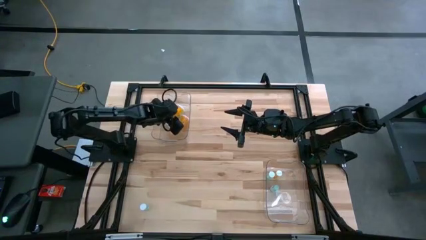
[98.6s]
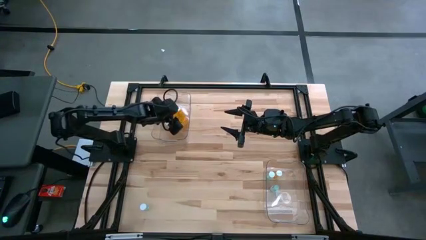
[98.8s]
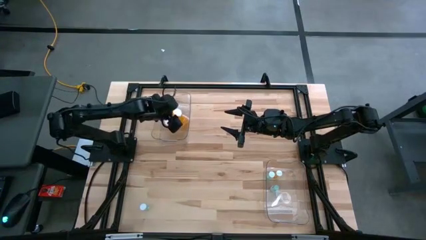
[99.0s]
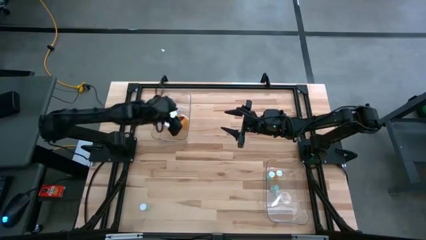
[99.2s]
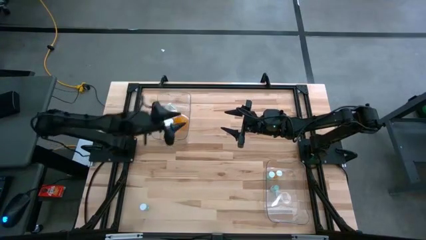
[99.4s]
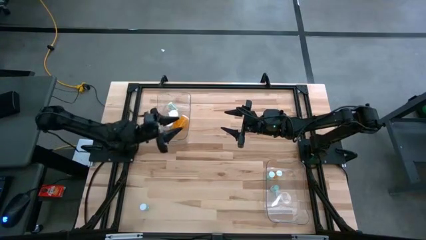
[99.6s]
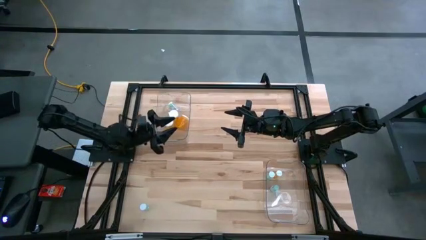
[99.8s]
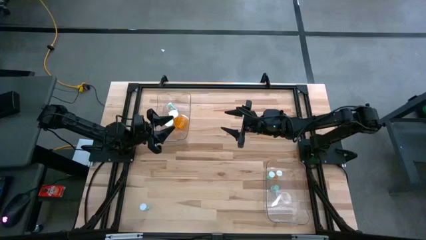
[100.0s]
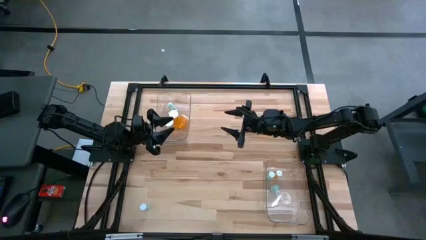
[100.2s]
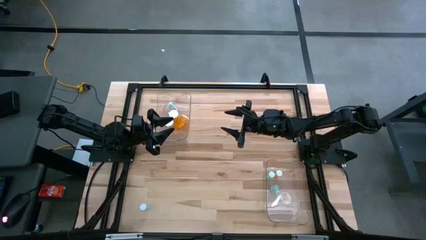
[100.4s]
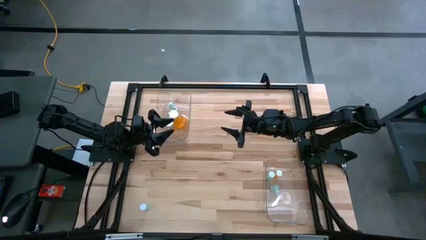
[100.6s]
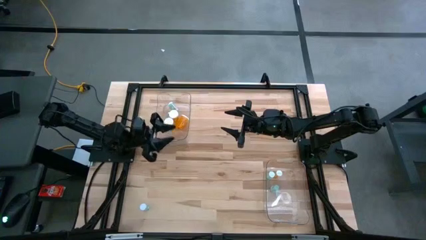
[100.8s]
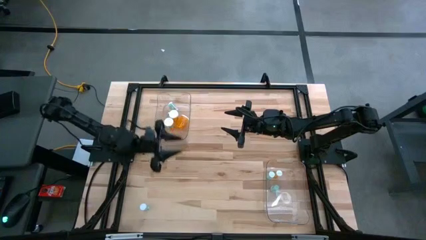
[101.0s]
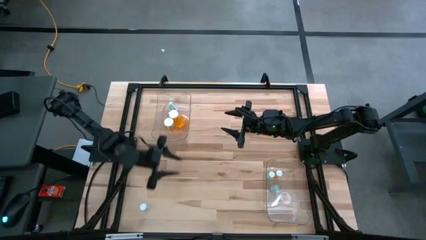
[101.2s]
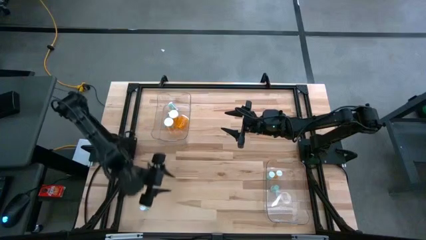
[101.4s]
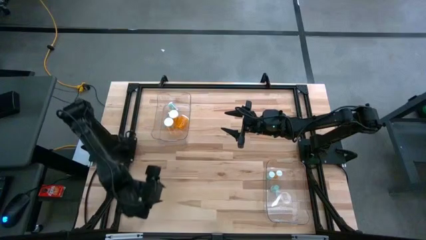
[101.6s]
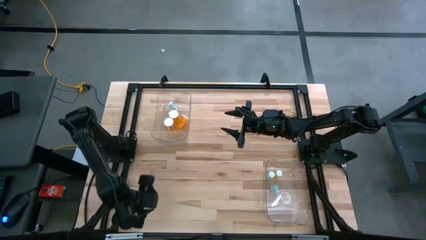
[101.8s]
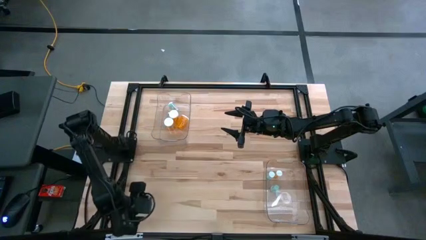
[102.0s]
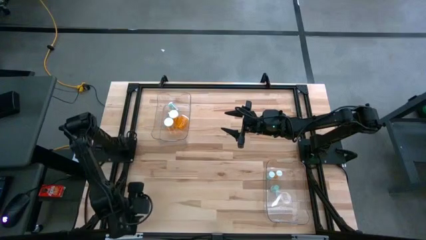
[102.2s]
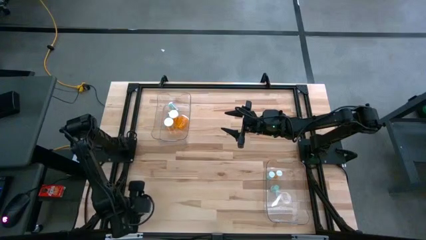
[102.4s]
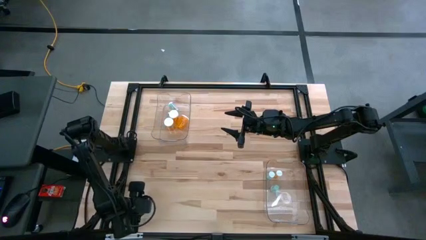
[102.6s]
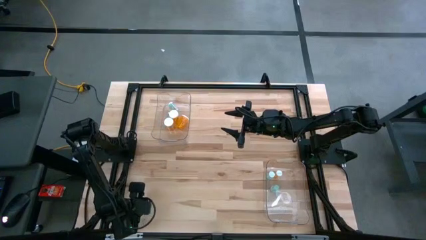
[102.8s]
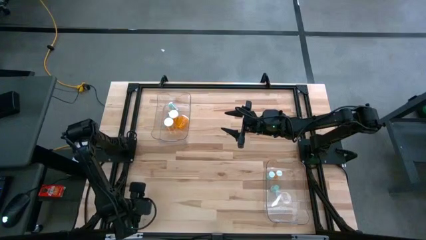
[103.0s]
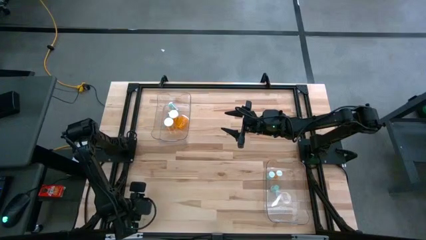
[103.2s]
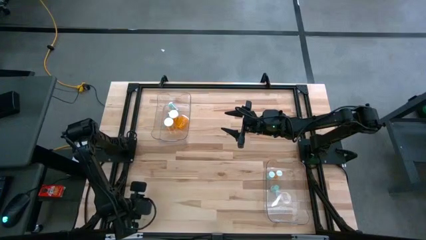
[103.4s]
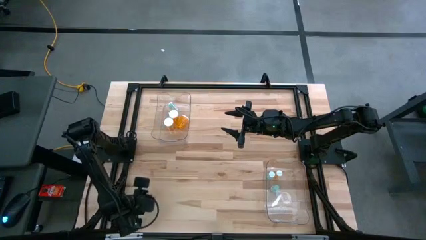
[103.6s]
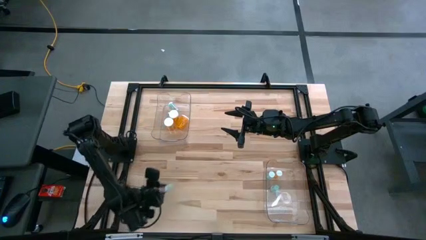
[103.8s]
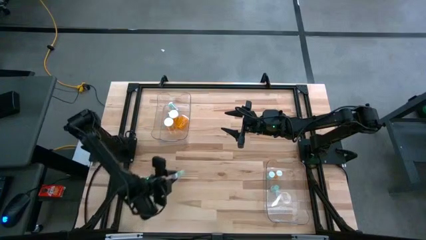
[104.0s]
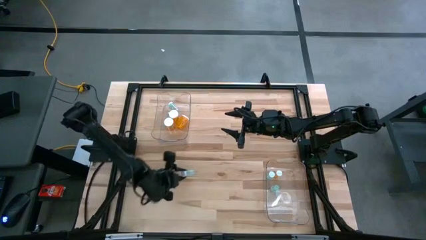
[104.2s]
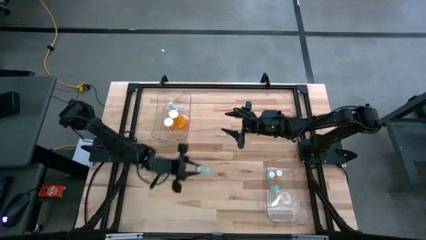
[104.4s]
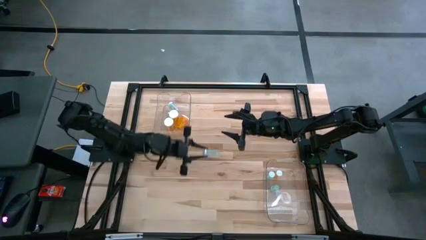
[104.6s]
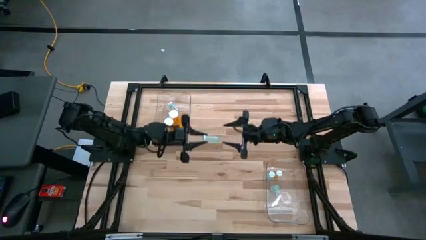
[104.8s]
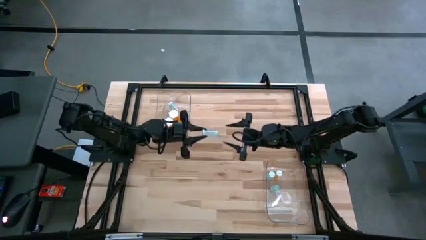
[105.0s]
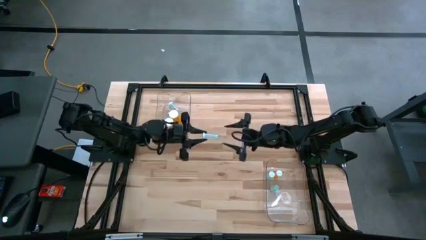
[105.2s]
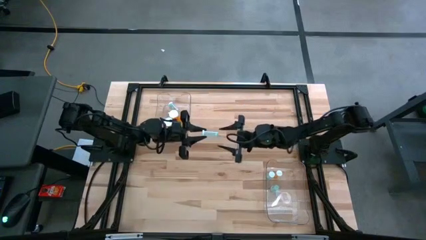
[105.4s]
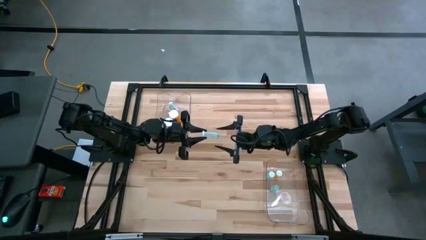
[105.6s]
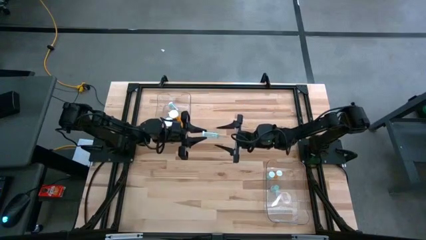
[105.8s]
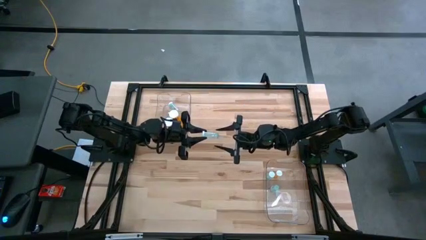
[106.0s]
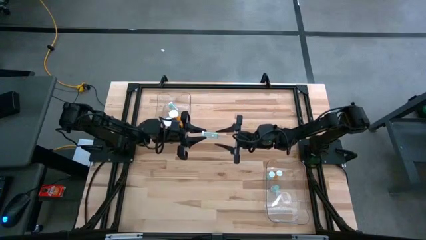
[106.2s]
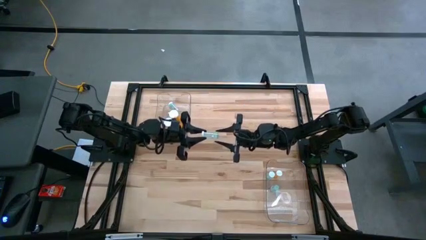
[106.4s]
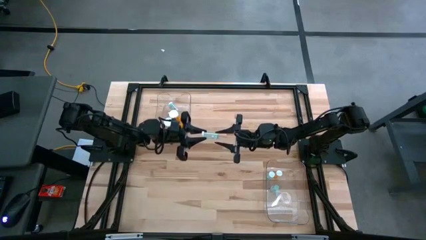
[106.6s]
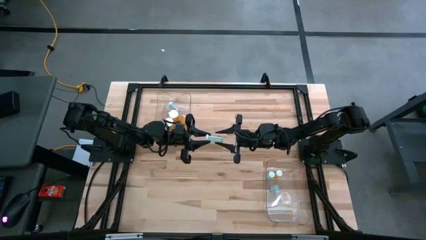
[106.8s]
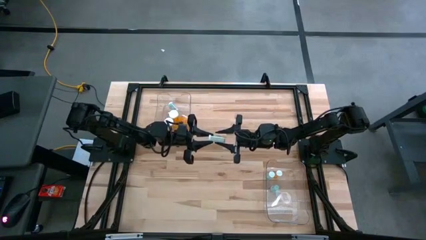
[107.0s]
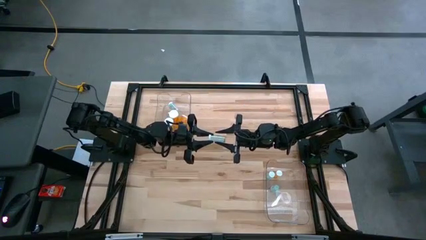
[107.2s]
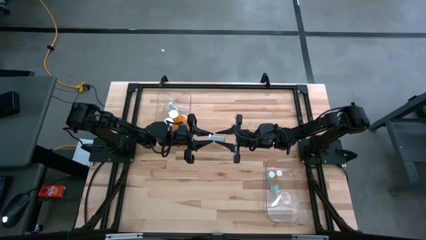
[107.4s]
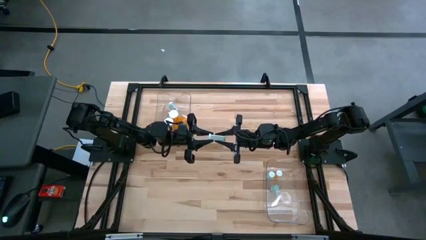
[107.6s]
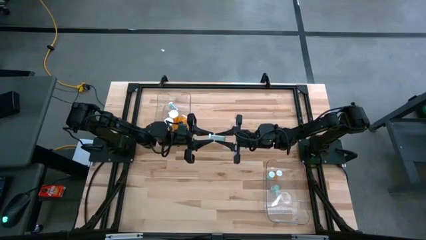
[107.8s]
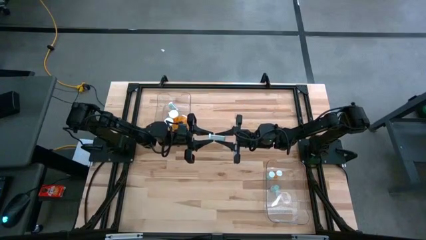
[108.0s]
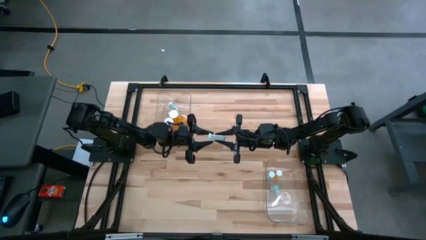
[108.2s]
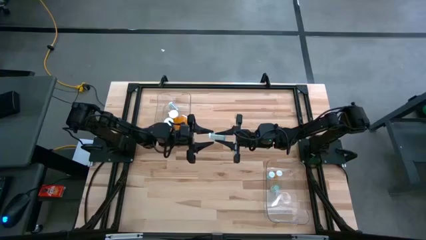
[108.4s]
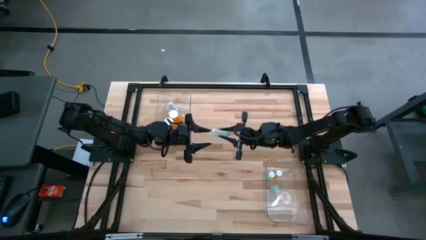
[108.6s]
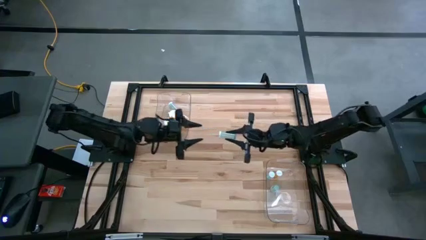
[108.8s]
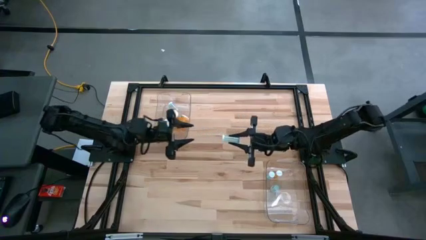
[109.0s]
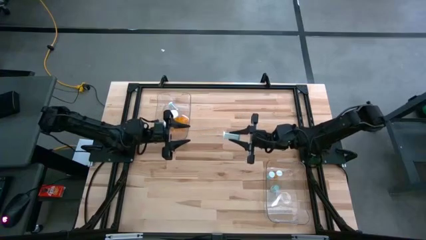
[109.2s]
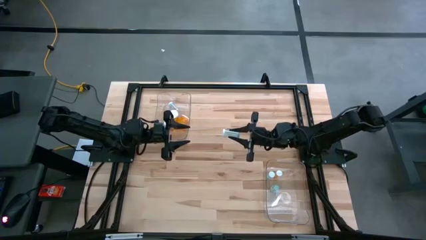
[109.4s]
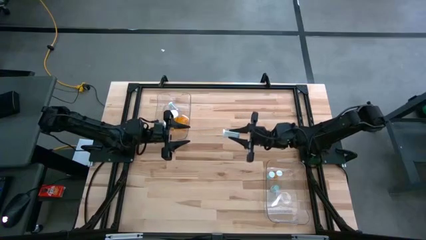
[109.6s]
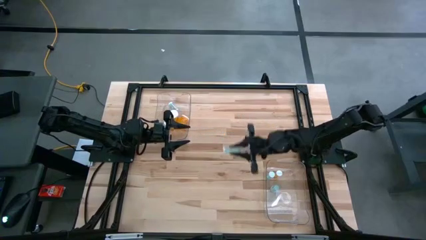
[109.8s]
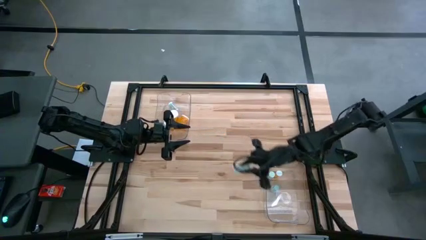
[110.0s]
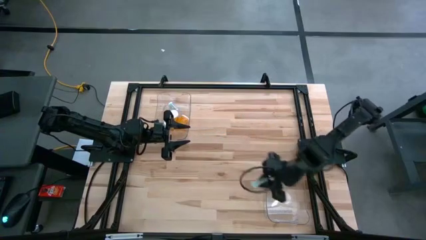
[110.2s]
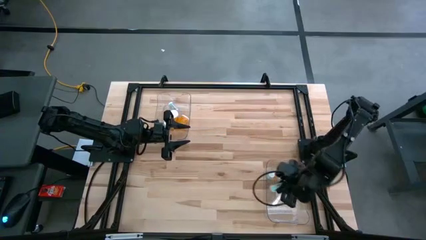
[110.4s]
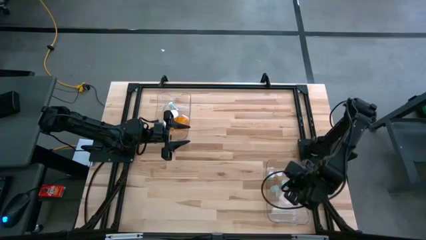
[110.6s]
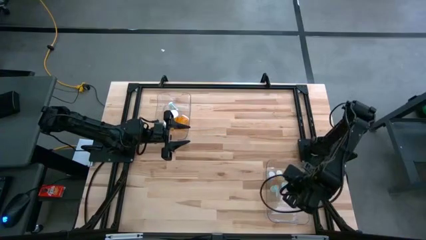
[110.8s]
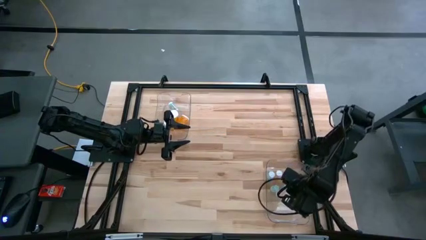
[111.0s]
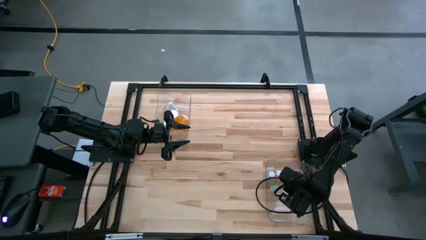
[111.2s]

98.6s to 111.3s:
Task: Pick and place medicine bottles into bin by pill shape (circle, oval)
Put the blue tablet bottle into the right transparent bin
